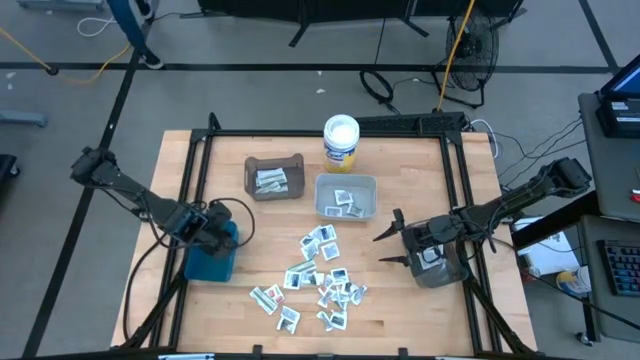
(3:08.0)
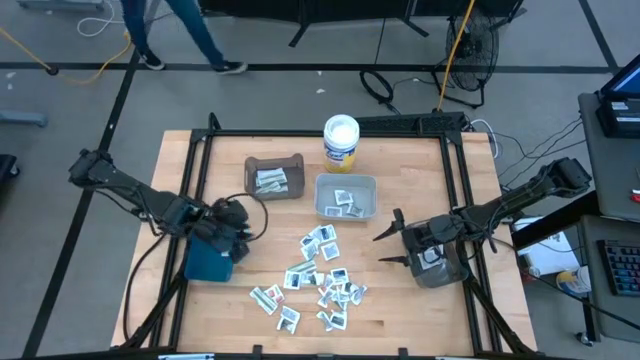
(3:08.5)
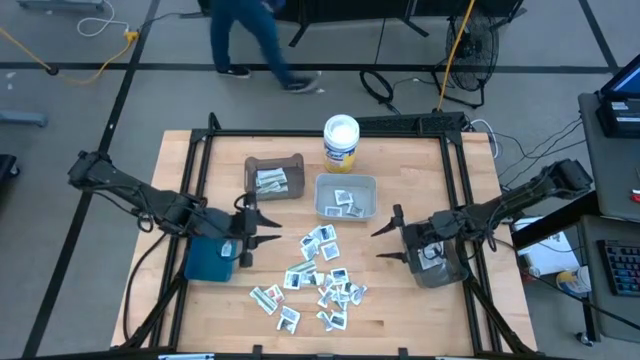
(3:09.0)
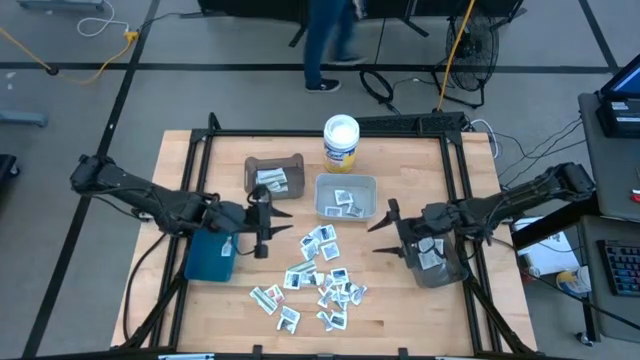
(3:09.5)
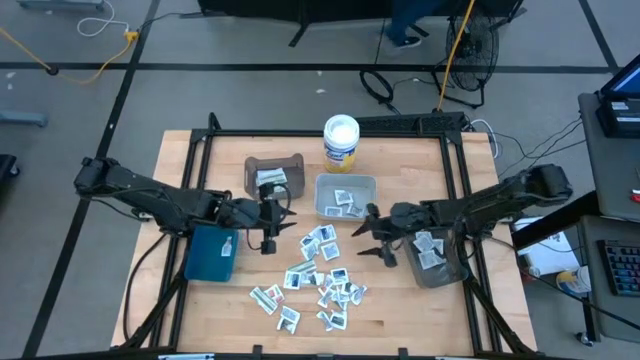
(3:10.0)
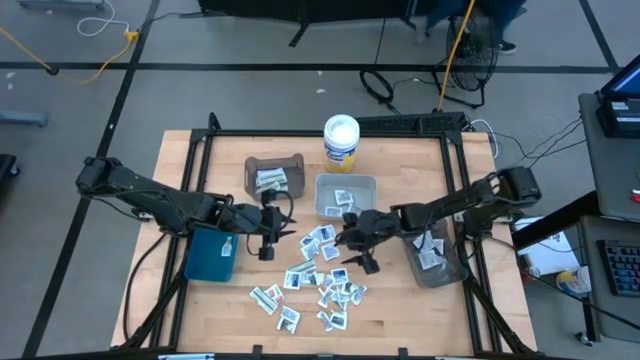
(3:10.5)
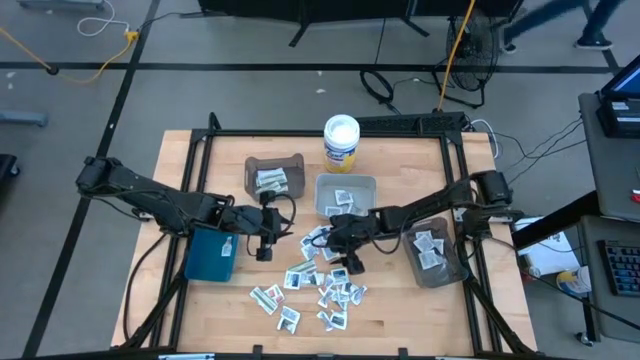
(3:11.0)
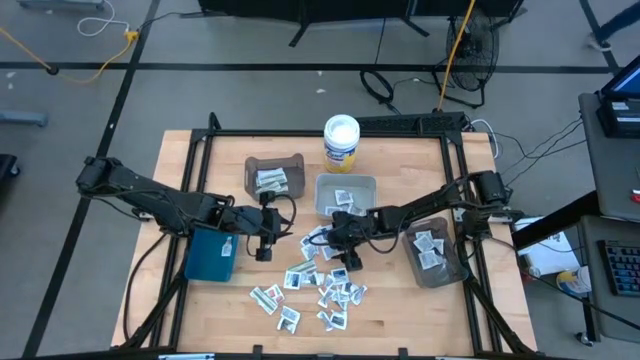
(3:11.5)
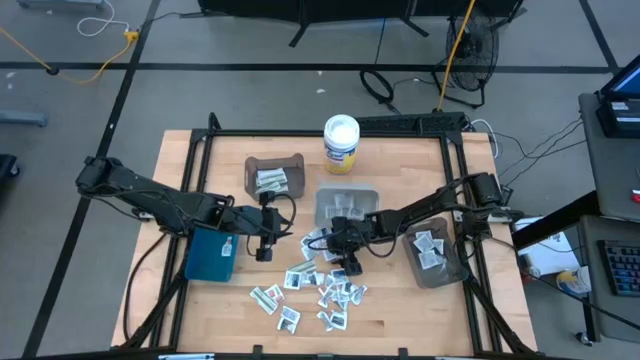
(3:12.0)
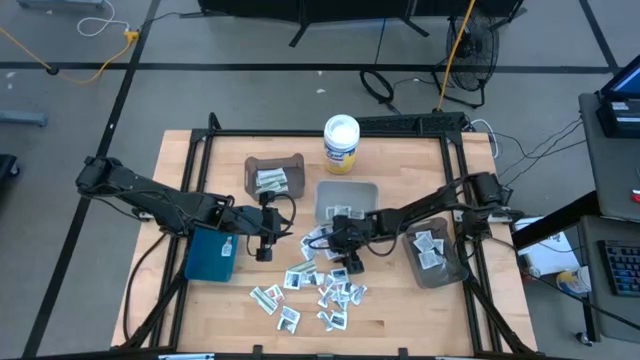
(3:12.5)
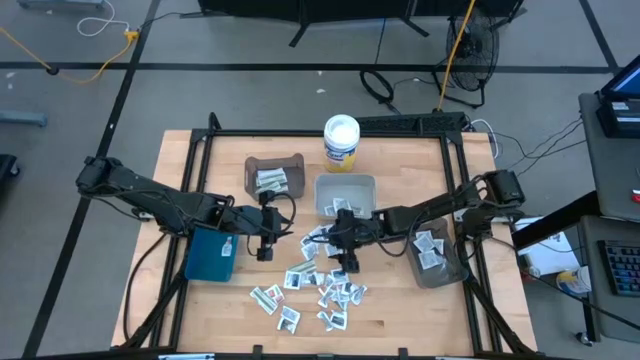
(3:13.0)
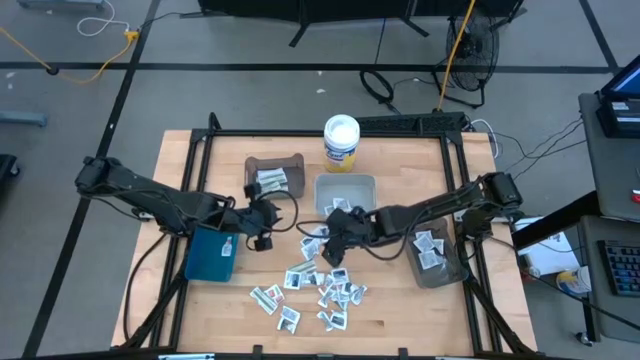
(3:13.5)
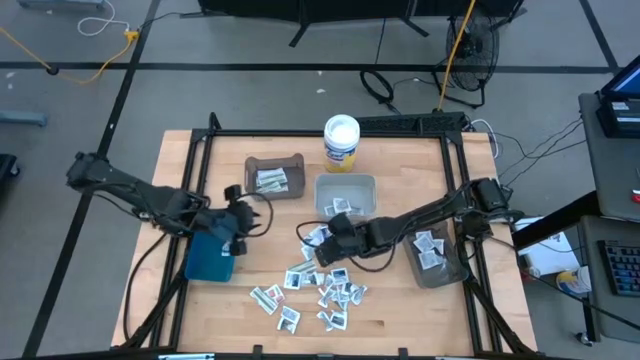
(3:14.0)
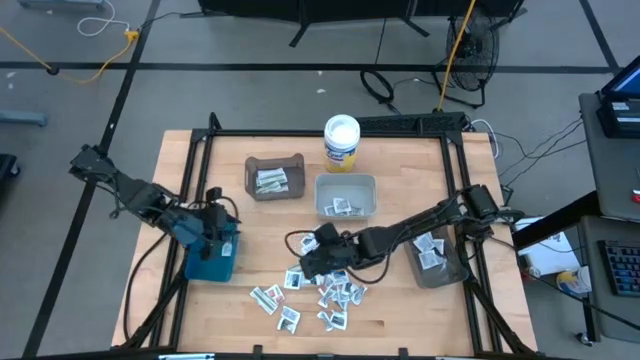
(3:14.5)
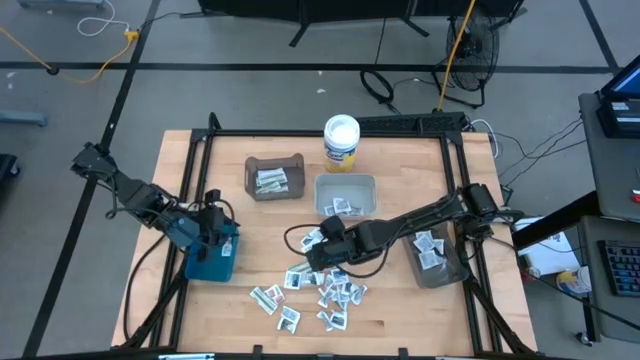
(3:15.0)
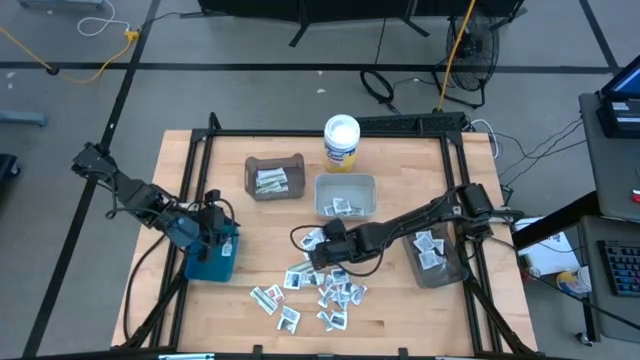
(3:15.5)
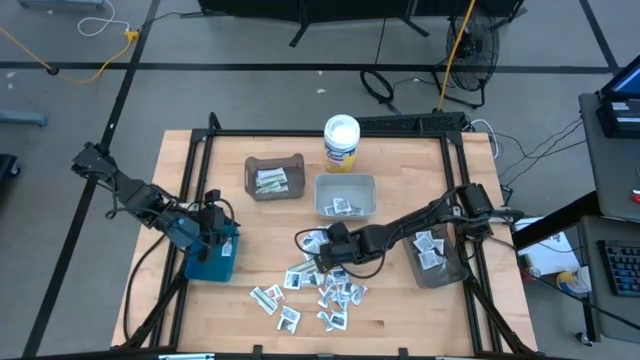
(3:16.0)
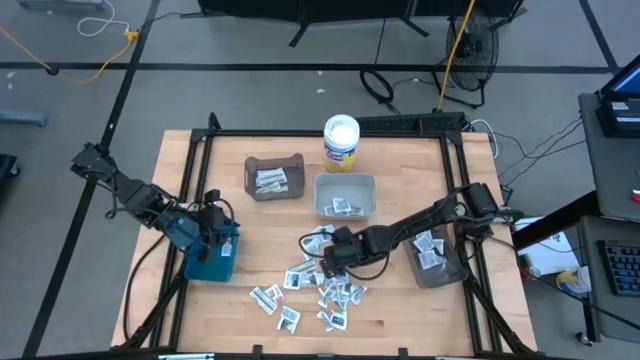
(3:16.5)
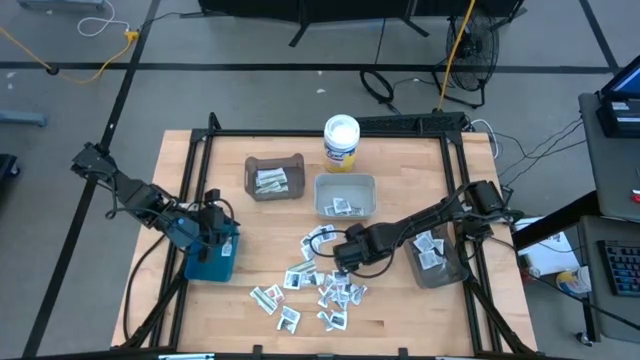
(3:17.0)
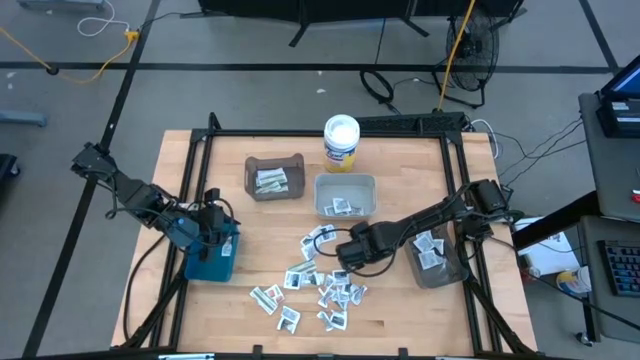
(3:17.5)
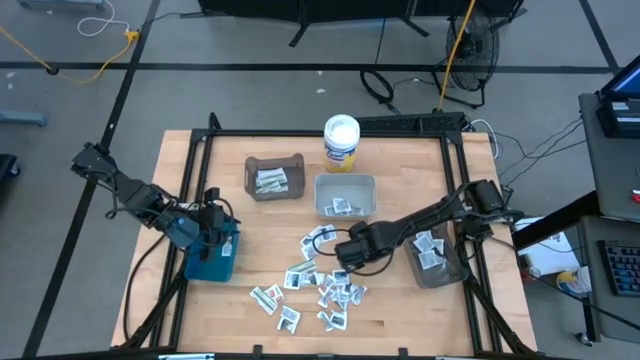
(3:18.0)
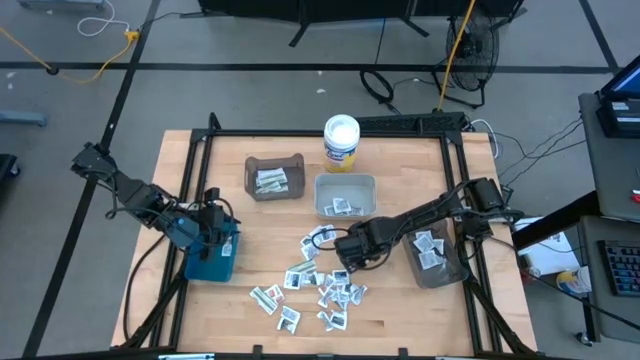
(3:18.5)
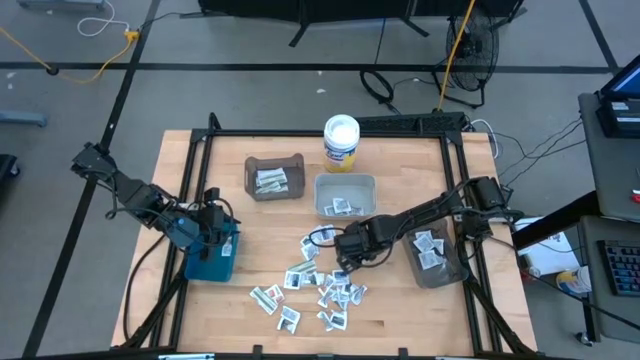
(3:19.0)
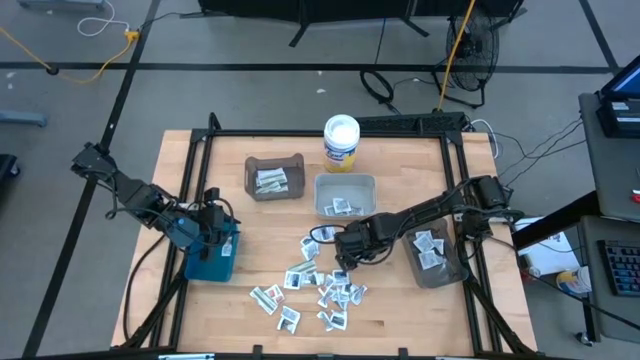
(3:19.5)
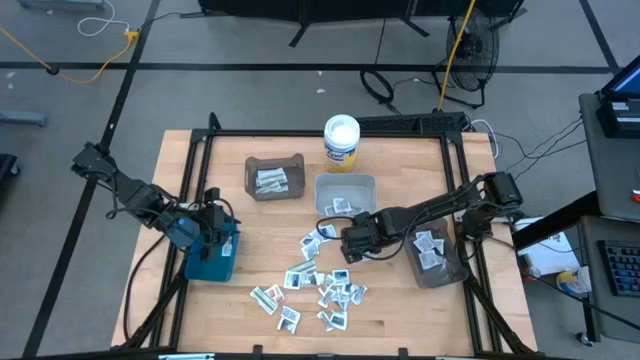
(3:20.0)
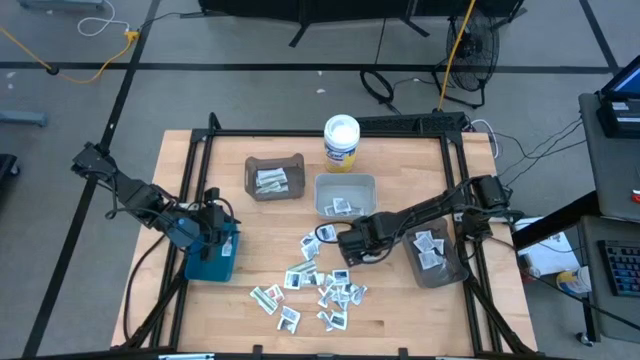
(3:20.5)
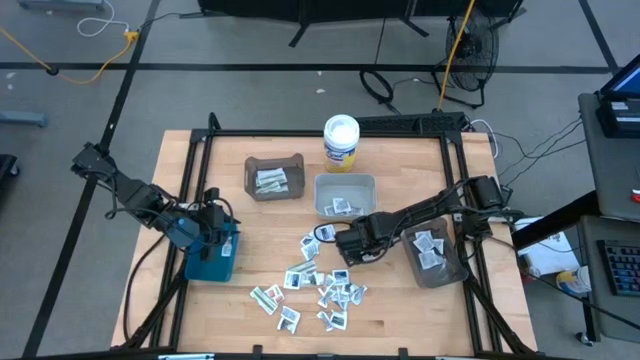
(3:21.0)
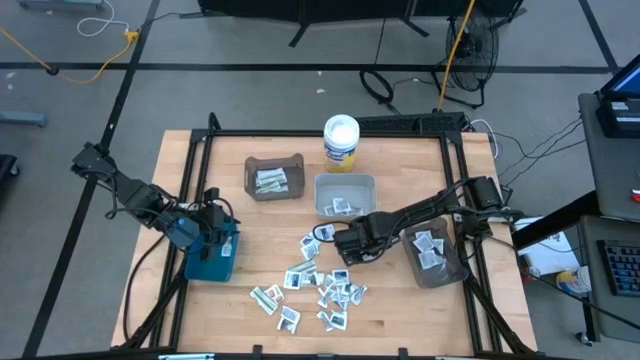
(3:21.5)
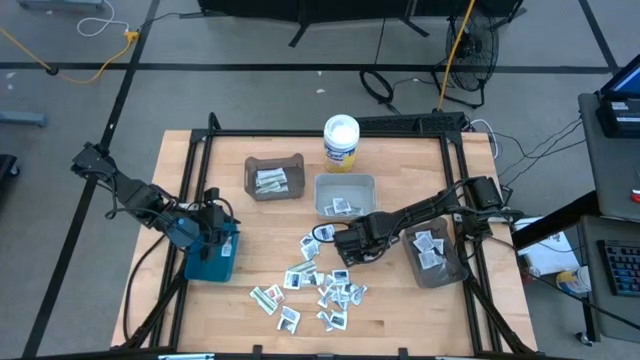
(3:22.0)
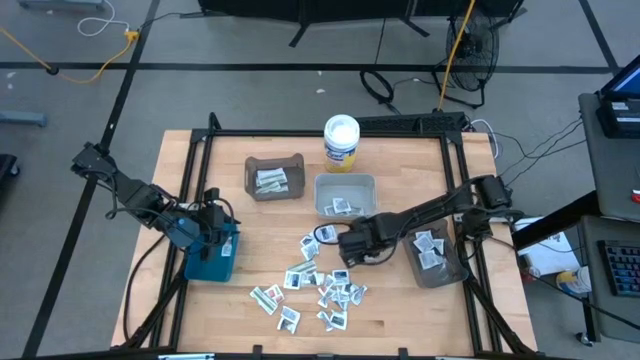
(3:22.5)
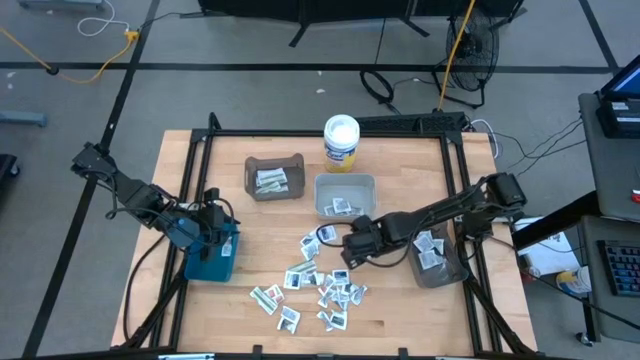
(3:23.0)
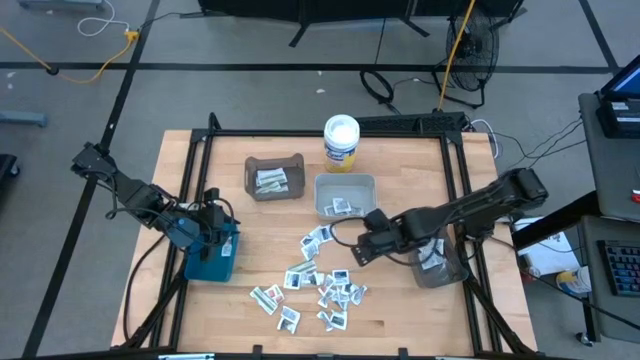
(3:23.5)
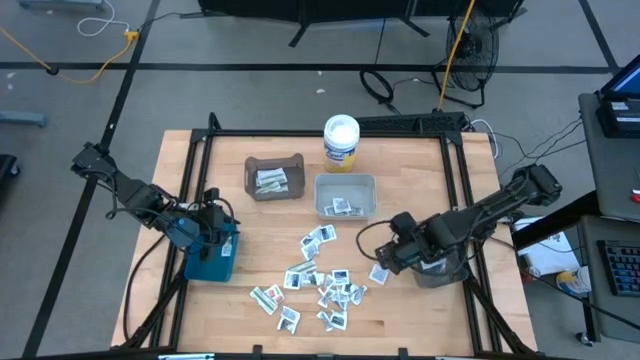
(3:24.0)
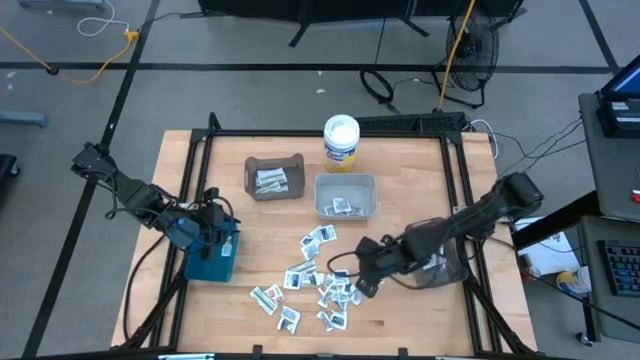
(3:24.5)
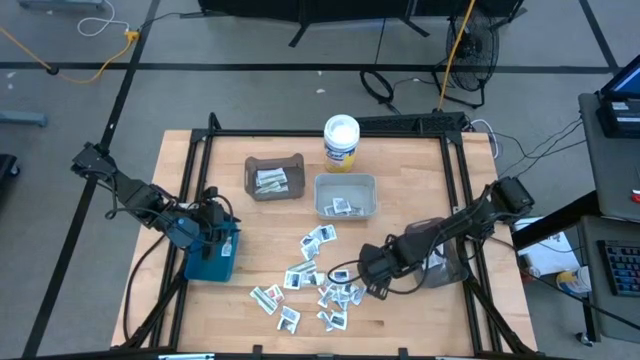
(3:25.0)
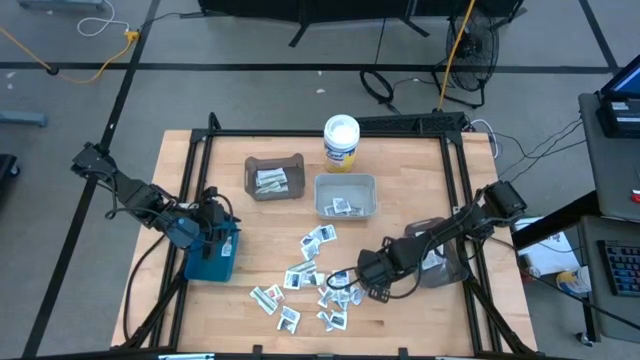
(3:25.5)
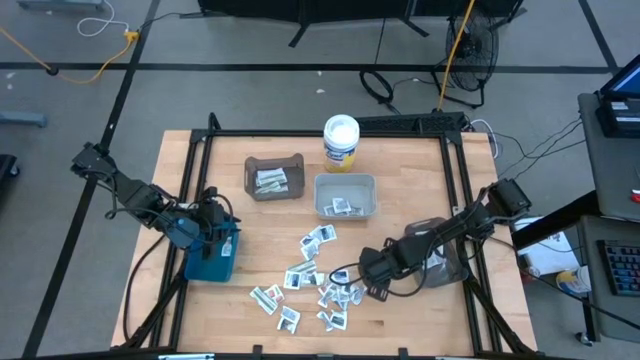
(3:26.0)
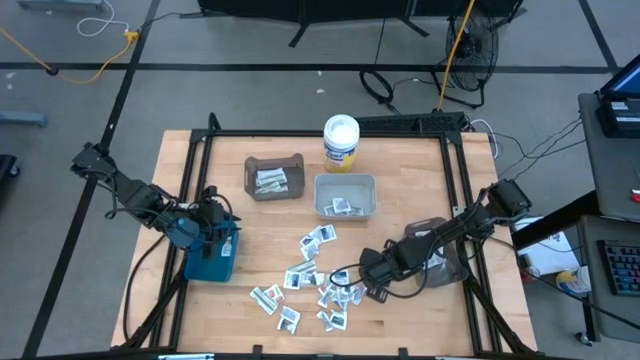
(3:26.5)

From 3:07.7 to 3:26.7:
Task: Pick & Place First Aid Supplies
Put the blue alcohol pad into the bottom black bin

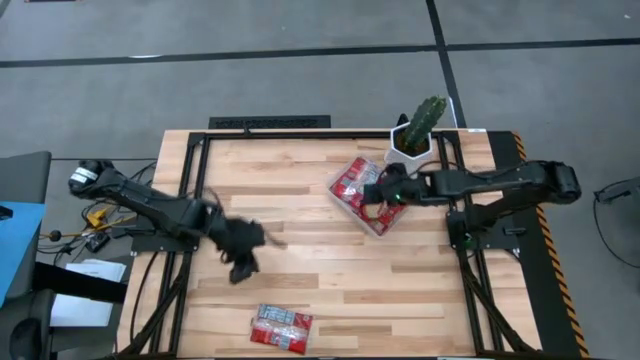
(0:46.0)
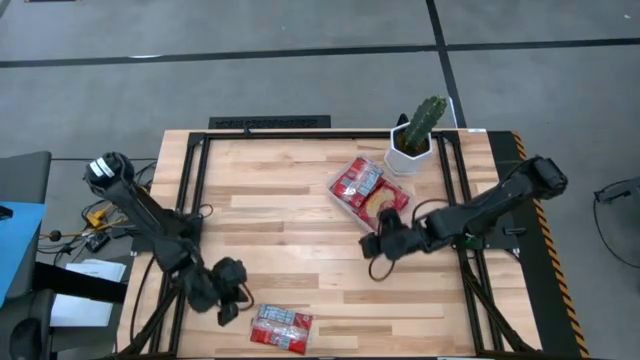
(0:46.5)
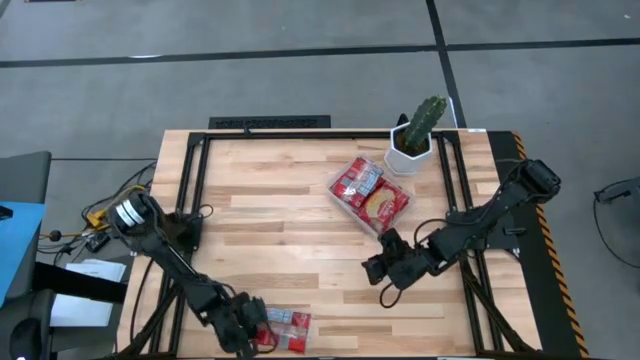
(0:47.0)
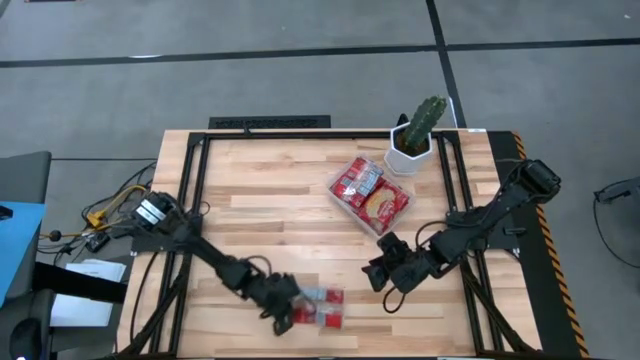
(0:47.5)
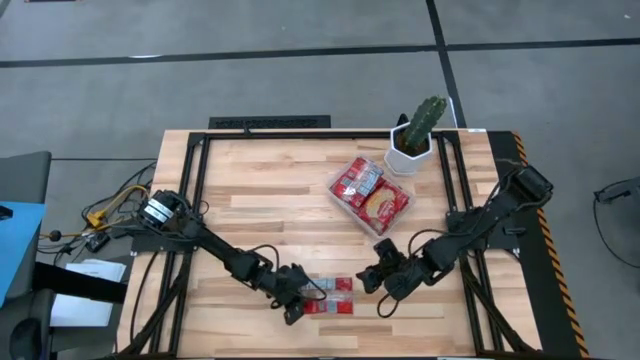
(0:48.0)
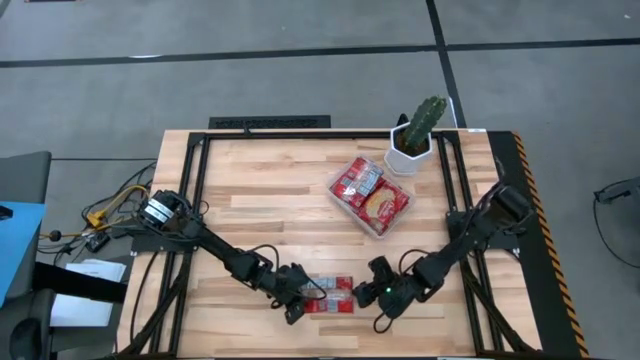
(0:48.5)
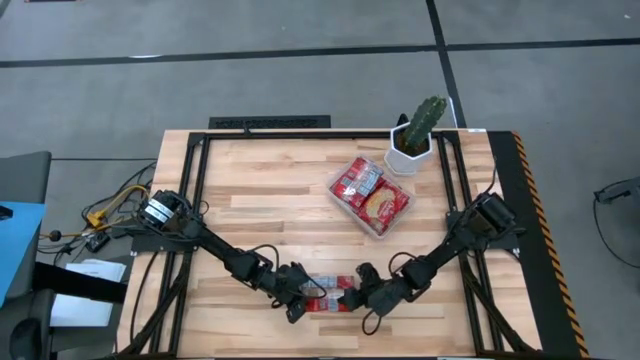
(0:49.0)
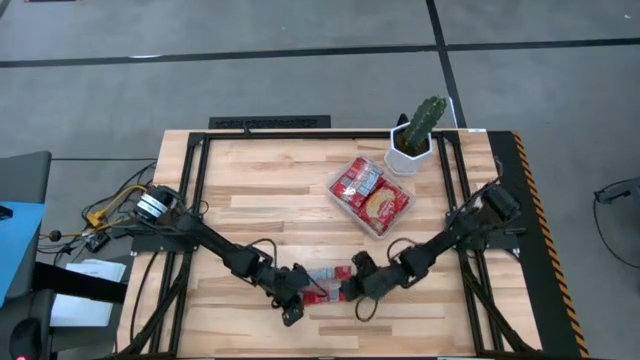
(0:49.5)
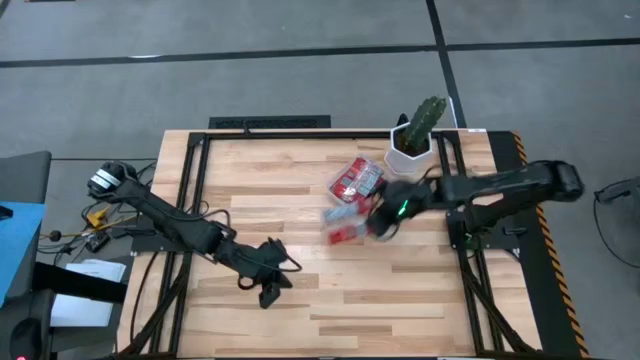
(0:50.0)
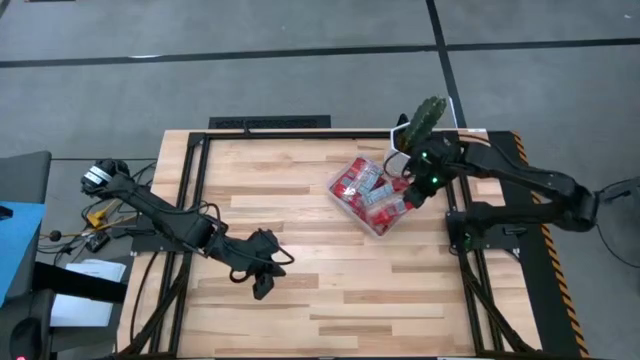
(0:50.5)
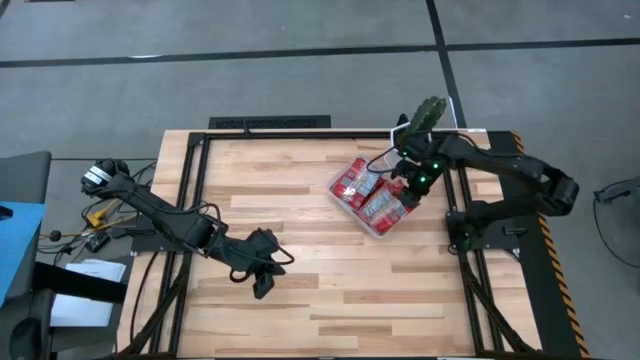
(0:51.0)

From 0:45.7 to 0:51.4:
Task: Sort popcorn bags into baskets
Put the red popcorn pack into the transparent bin
